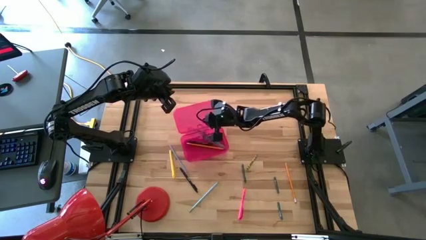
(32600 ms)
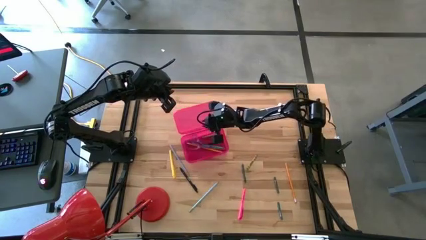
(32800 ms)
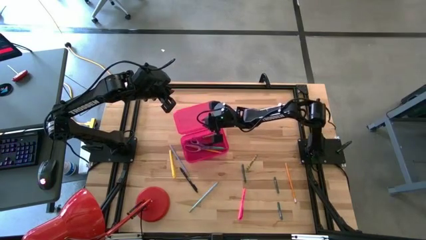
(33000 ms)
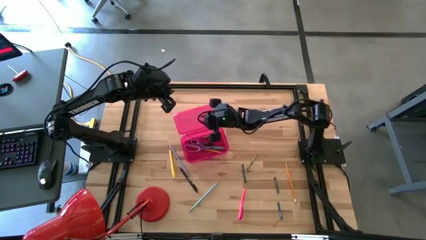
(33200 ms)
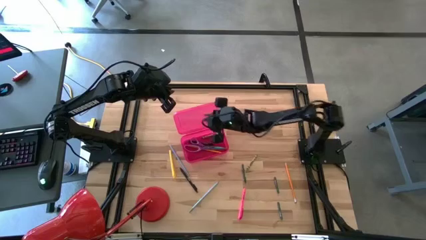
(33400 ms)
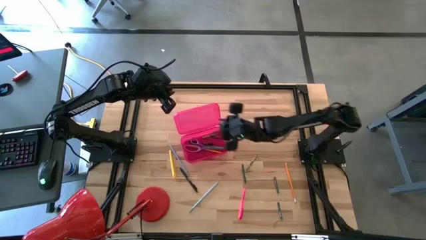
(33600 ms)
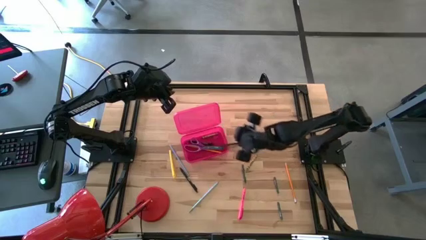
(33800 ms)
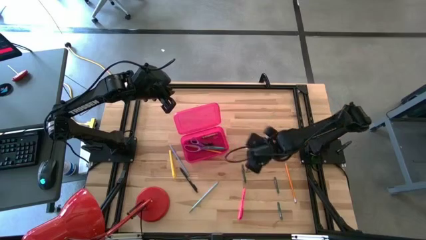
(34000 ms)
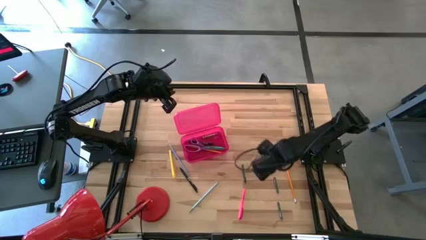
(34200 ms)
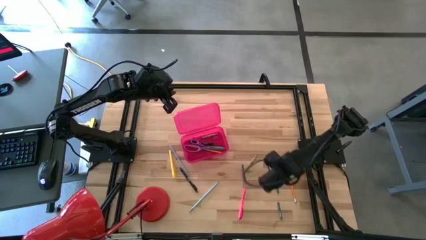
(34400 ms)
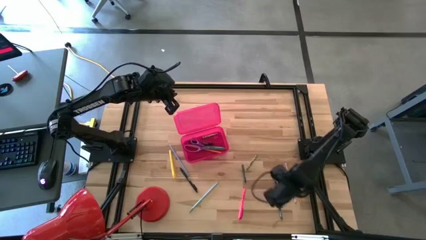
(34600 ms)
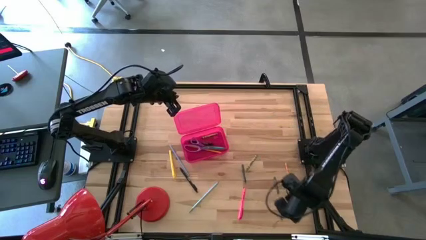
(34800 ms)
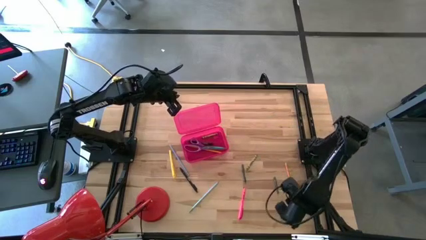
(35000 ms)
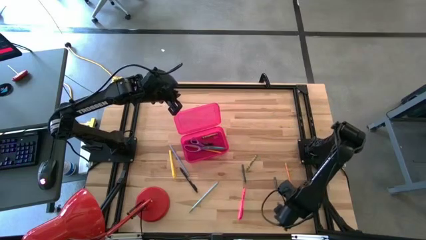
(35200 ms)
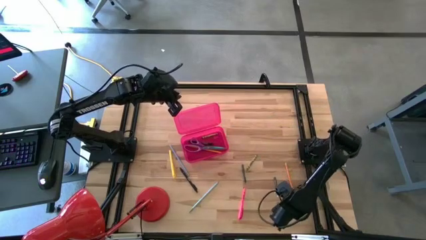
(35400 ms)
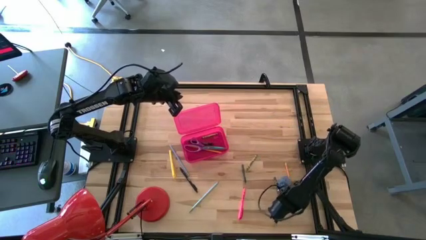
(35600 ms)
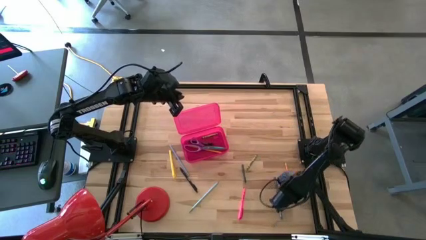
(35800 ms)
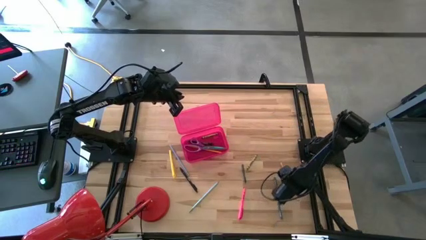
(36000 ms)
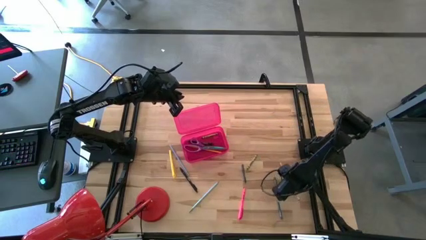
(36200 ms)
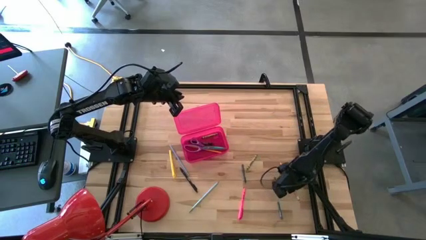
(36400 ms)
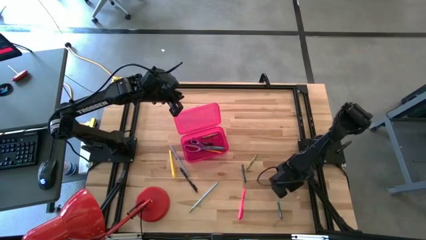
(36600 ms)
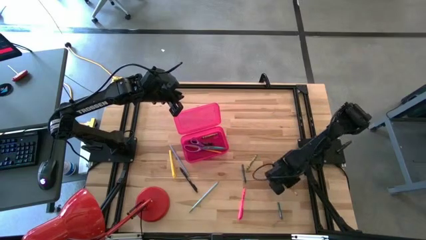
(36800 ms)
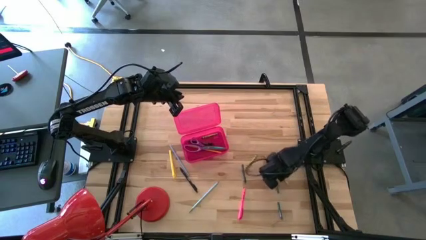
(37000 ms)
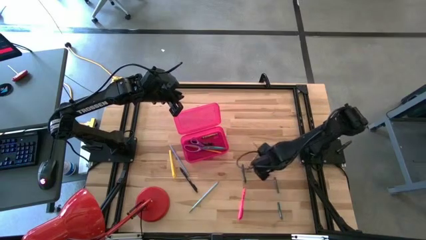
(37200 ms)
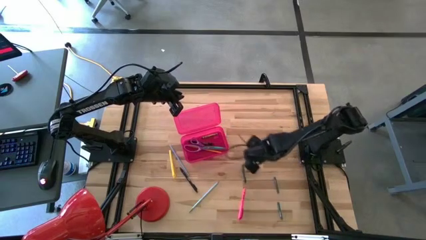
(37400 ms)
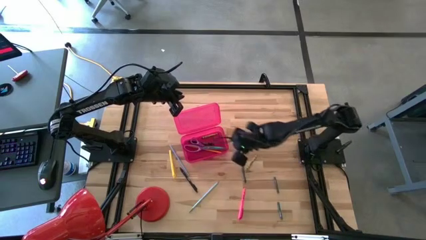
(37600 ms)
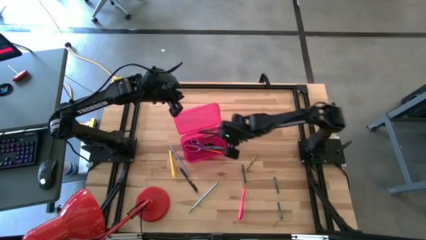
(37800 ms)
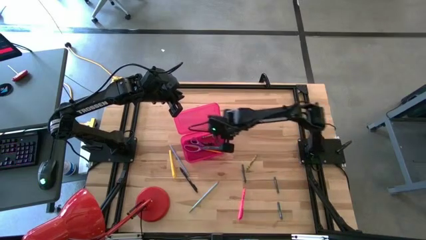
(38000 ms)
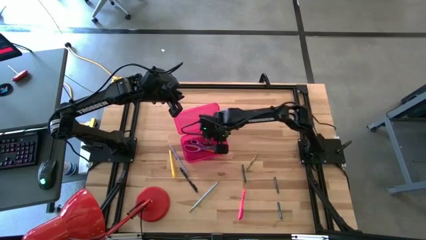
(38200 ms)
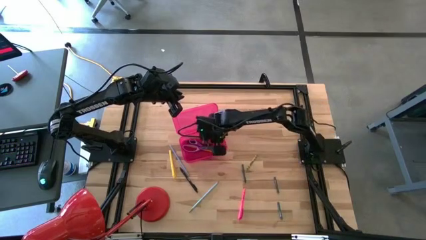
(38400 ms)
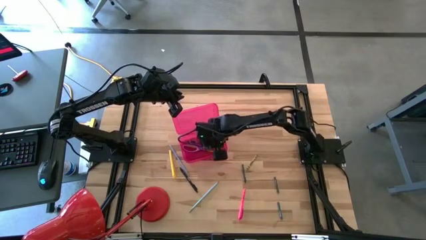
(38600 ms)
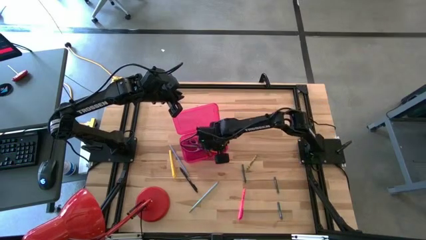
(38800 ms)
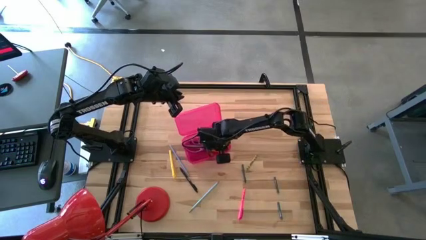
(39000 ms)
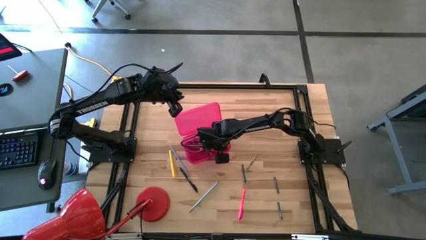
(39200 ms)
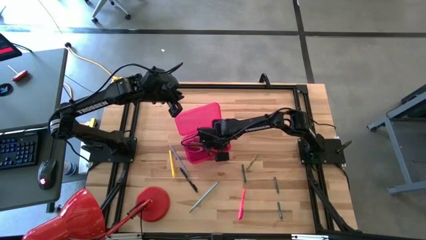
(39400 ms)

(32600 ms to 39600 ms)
Task: Pick & place school supplies into a supply box
Put the yellow pencil into the pink supply box

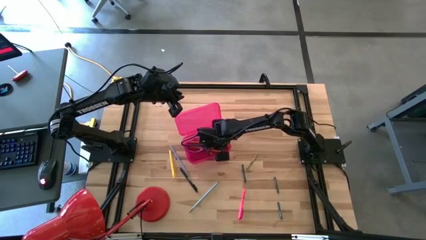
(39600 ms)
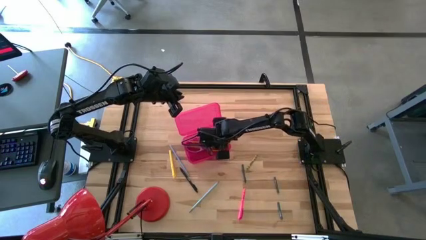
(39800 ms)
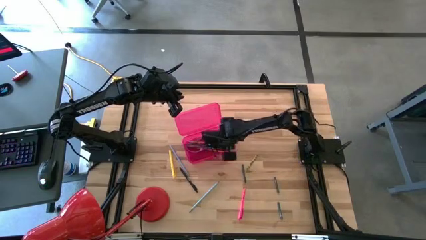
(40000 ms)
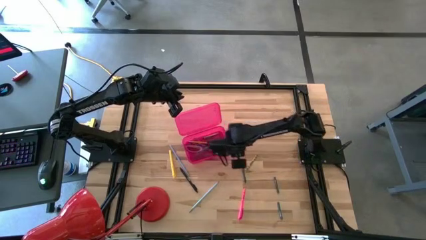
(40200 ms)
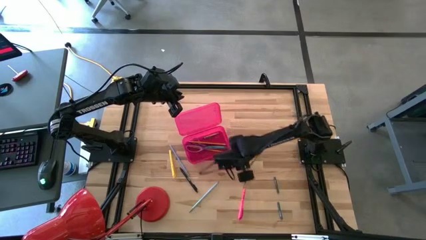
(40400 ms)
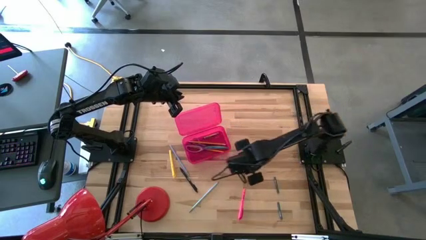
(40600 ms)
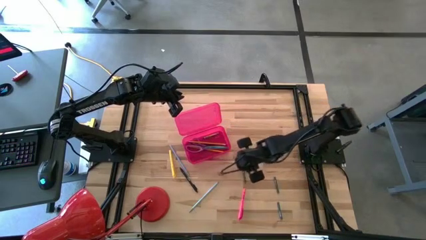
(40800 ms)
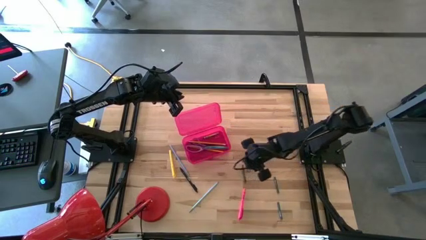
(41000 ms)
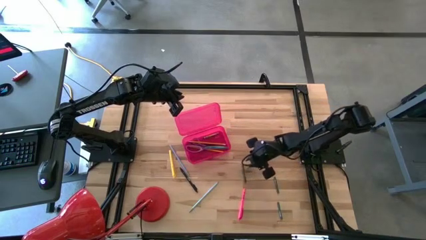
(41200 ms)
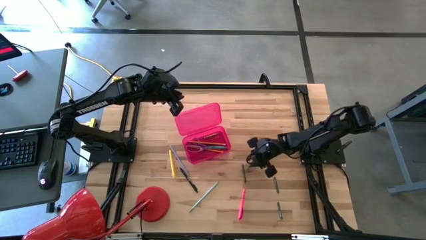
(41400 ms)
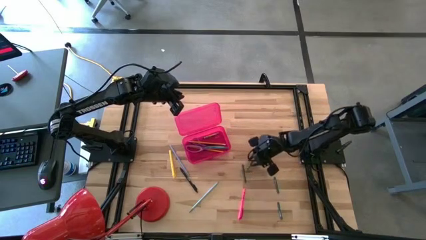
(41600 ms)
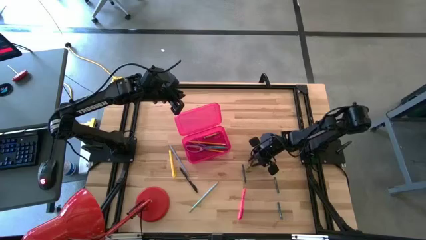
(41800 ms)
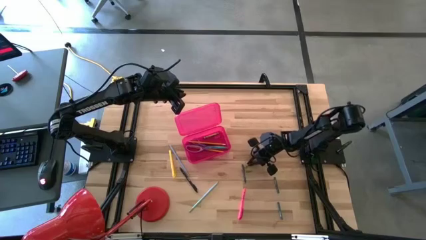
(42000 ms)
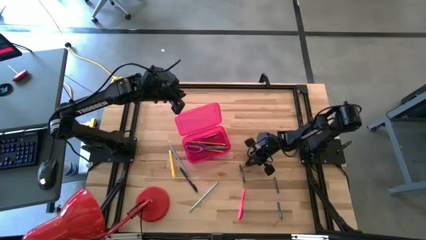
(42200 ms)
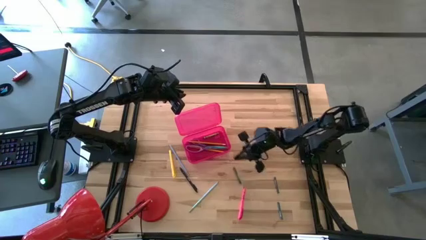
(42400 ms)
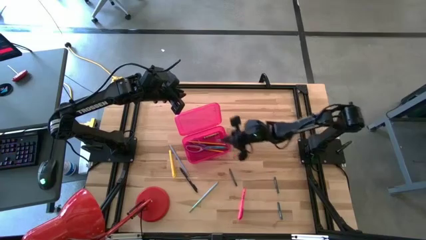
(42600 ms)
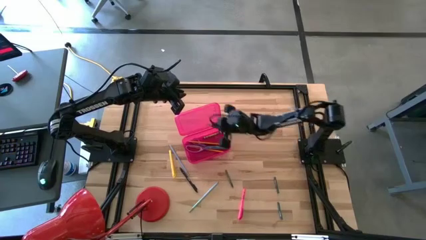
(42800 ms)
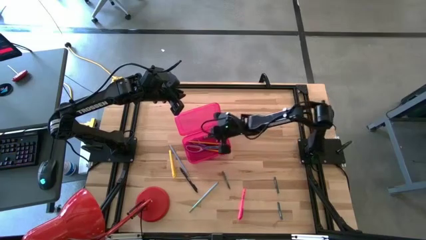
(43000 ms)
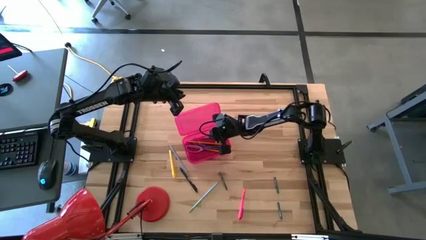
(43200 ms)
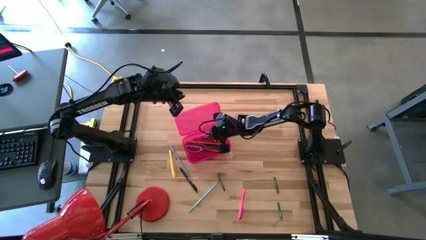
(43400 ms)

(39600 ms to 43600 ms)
Put the green crayon into the pink supply box

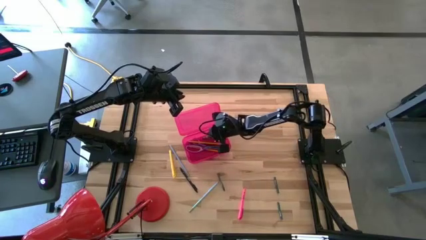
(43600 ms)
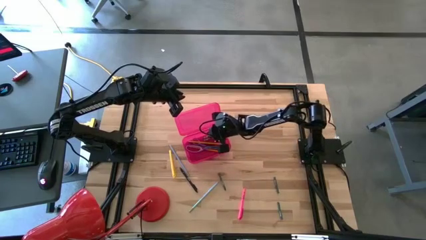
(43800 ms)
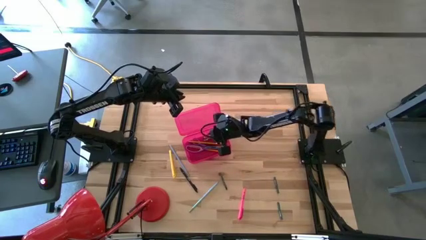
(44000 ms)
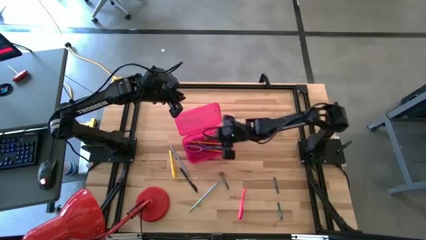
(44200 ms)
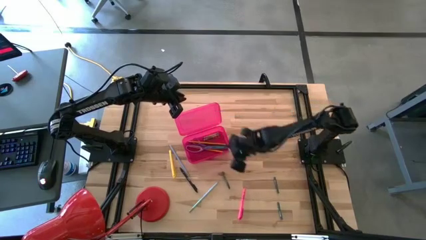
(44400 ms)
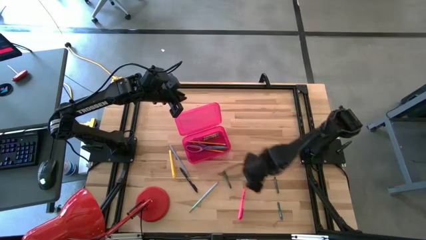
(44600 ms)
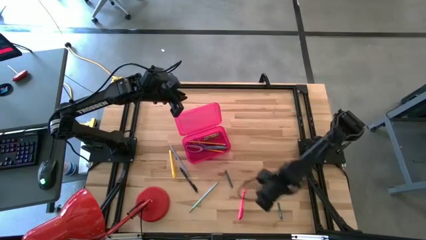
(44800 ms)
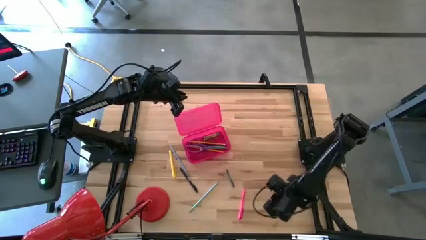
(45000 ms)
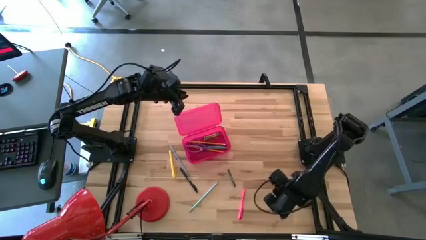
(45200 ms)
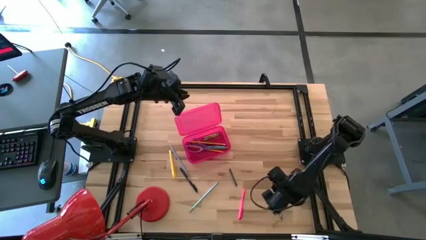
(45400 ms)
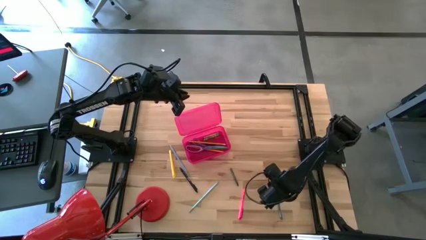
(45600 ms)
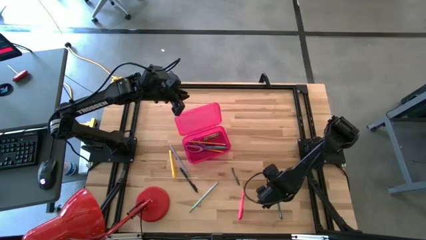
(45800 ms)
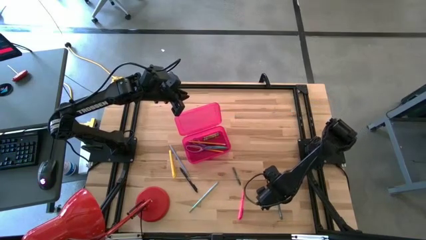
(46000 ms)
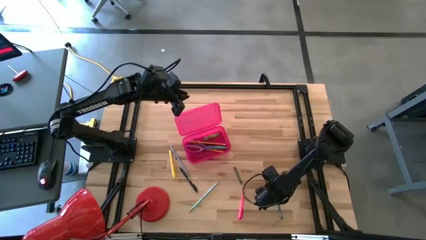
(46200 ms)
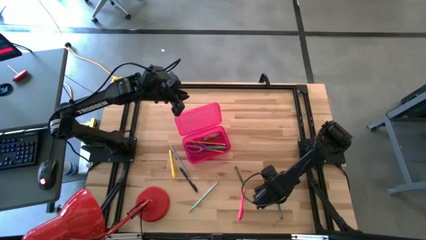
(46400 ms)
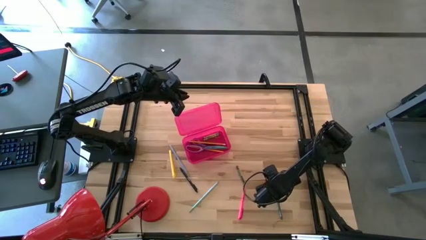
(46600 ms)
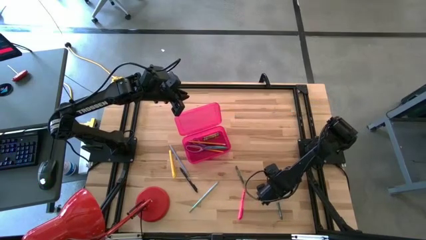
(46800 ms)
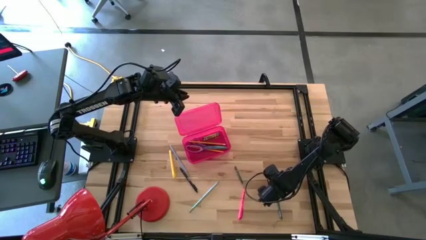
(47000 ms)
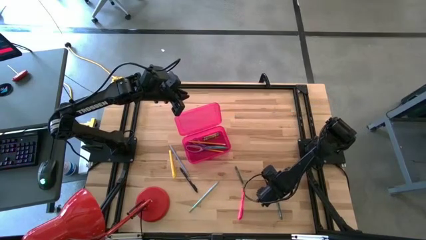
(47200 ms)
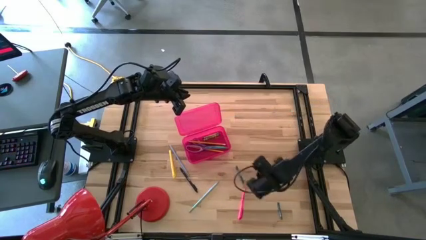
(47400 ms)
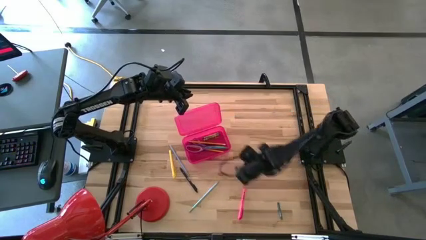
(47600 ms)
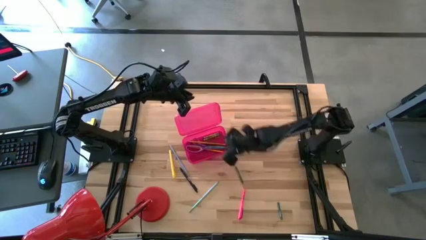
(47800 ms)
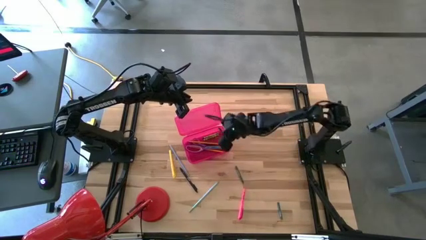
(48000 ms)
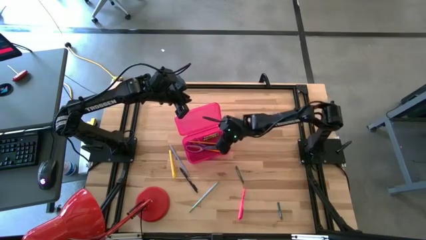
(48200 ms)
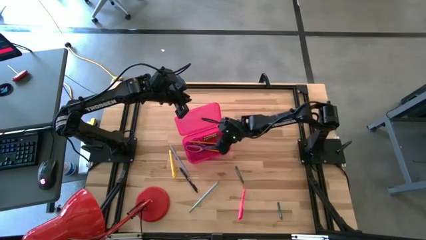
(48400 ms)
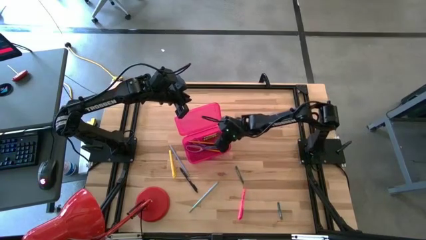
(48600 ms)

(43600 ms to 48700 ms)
Put the middle dark green color into the pink supply box

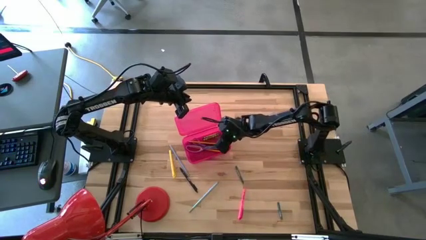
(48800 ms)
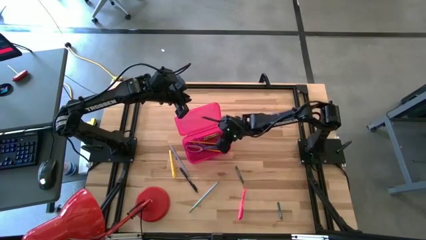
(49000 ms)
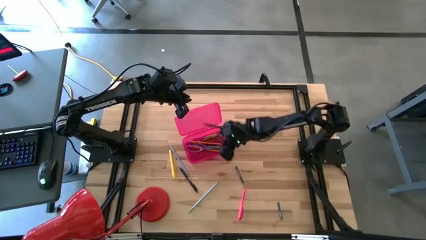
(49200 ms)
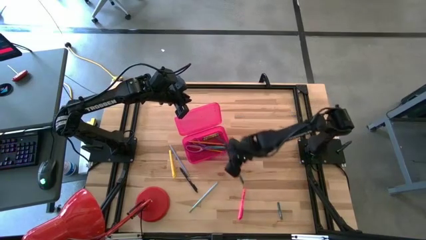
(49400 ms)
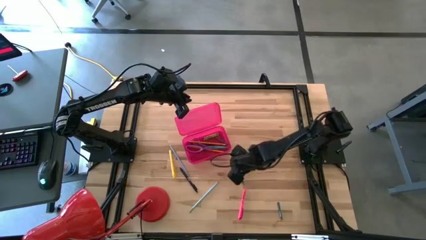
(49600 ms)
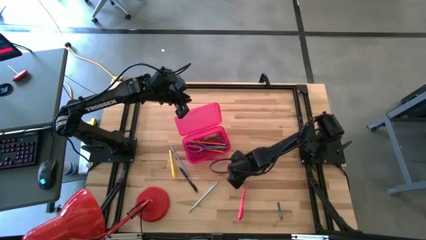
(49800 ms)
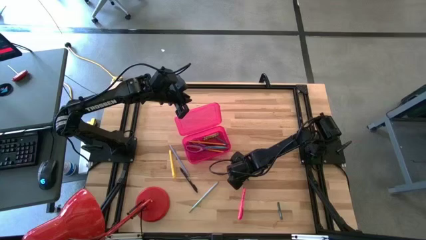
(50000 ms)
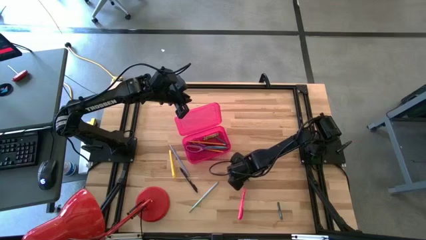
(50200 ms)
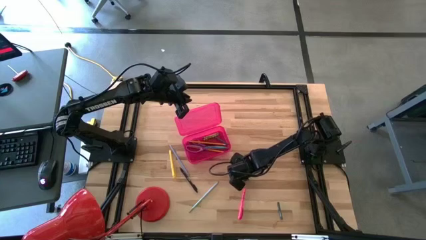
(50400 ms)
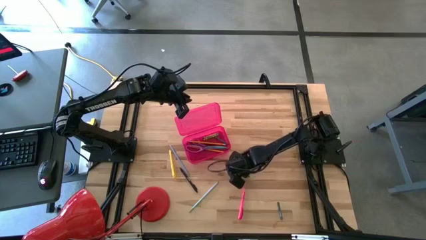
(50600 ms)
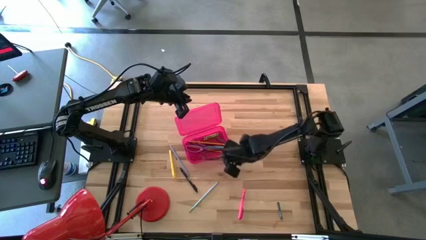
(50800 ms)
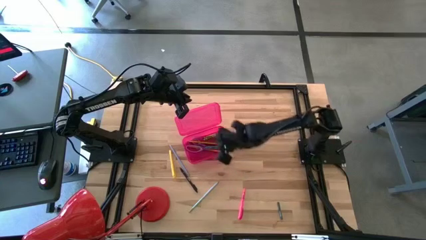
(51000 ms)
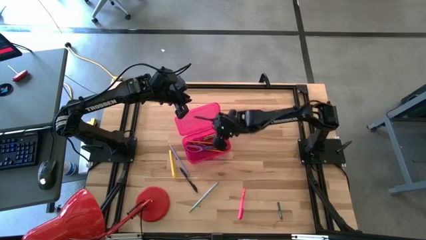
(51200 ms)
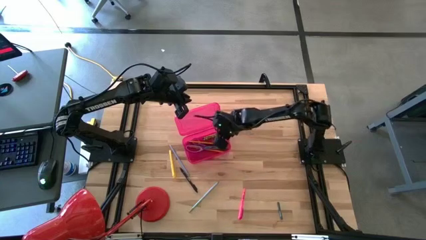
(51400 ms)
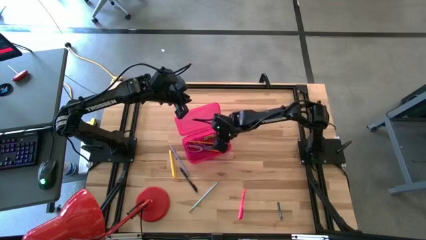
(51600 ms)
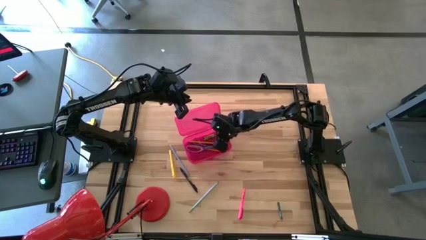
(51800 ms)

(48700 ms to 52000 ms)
Put the top dark green crayon into the pink supply box
